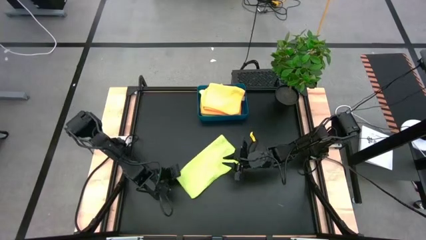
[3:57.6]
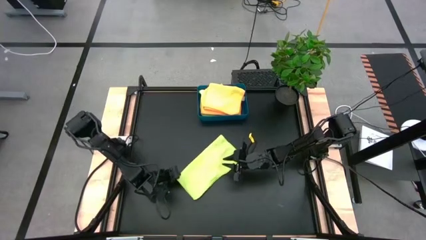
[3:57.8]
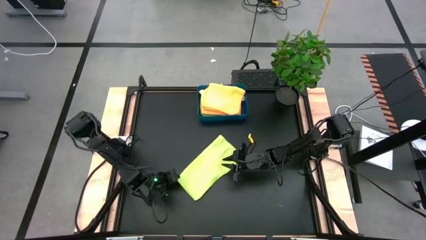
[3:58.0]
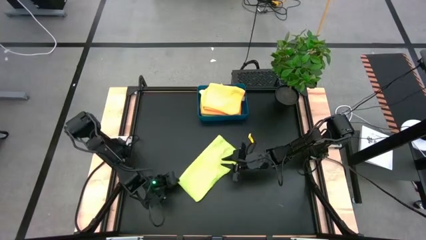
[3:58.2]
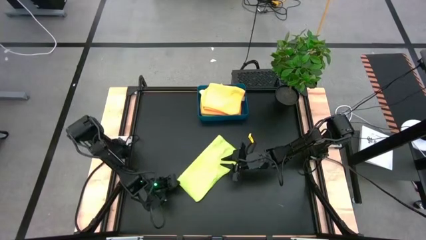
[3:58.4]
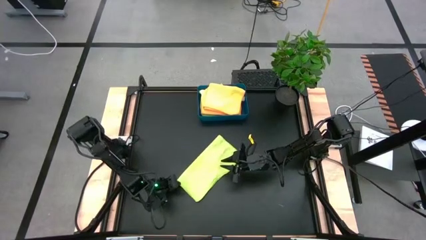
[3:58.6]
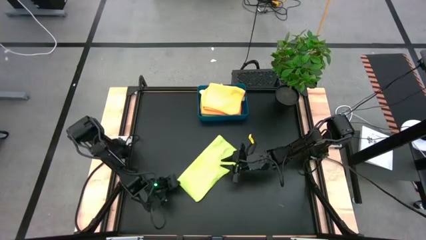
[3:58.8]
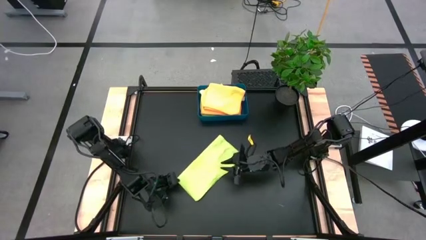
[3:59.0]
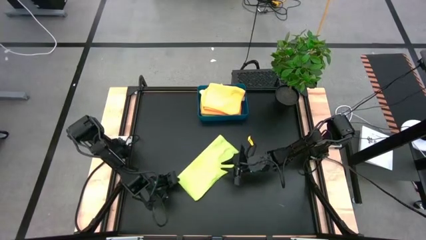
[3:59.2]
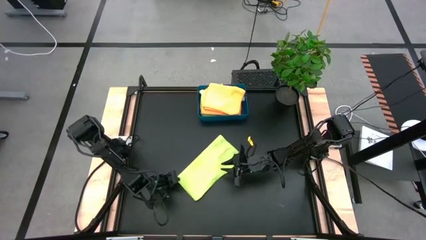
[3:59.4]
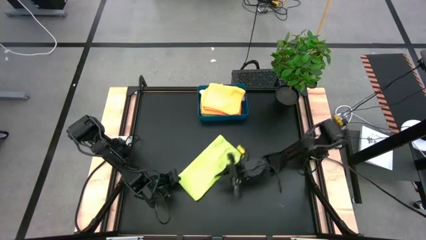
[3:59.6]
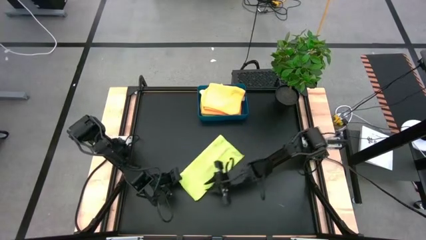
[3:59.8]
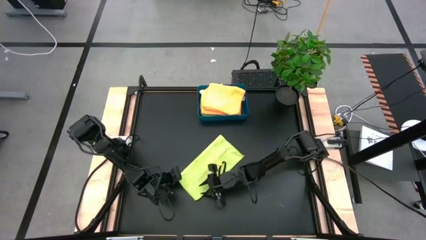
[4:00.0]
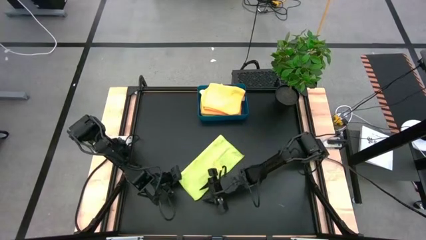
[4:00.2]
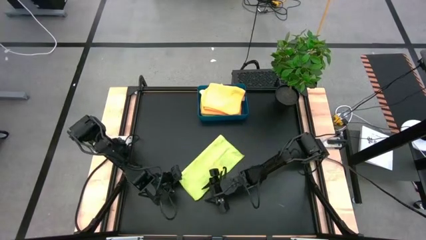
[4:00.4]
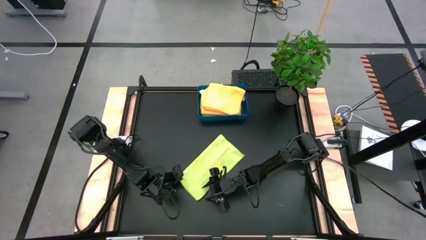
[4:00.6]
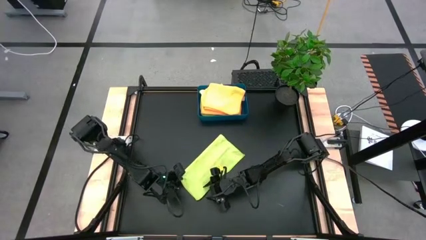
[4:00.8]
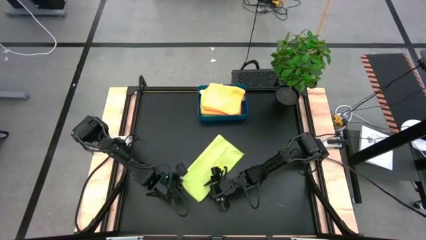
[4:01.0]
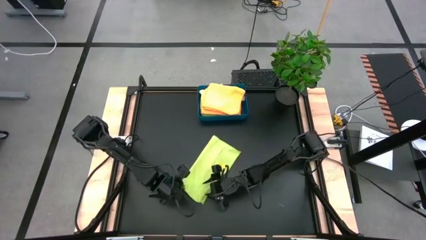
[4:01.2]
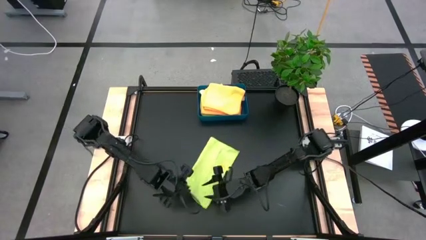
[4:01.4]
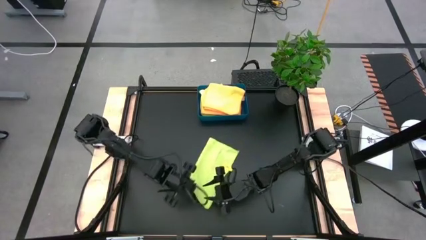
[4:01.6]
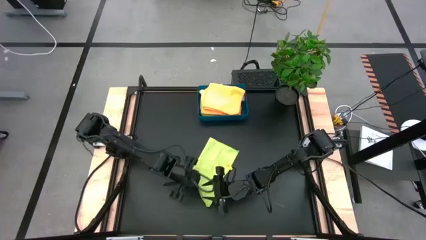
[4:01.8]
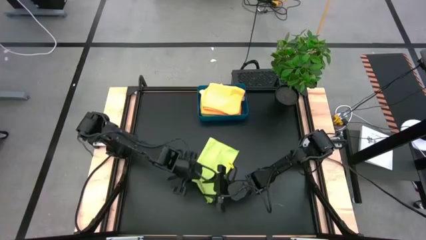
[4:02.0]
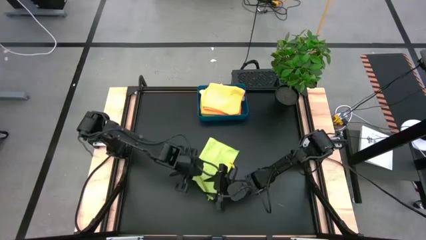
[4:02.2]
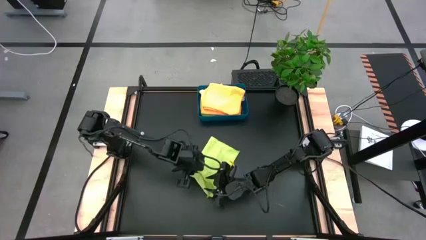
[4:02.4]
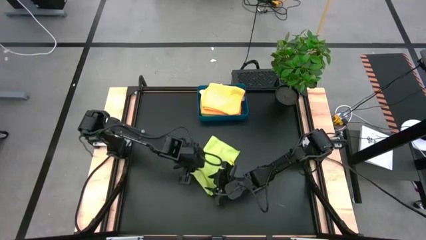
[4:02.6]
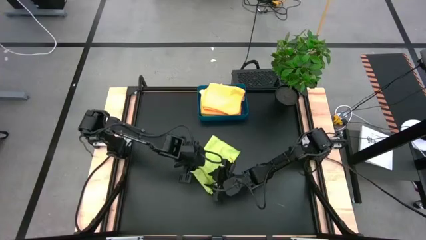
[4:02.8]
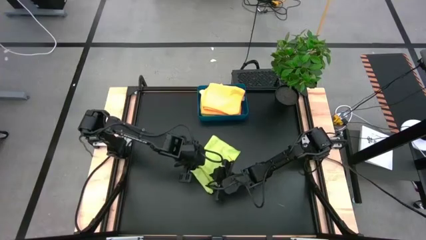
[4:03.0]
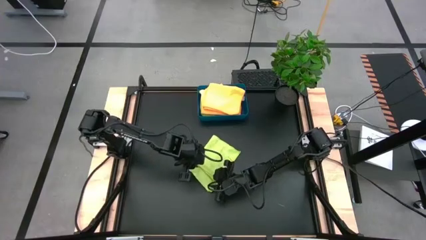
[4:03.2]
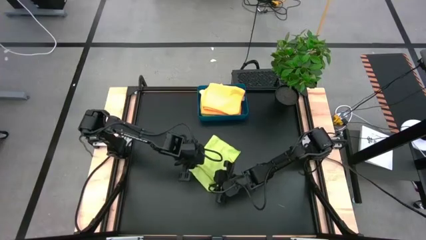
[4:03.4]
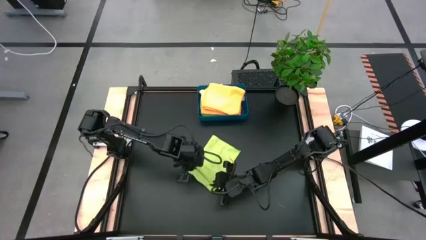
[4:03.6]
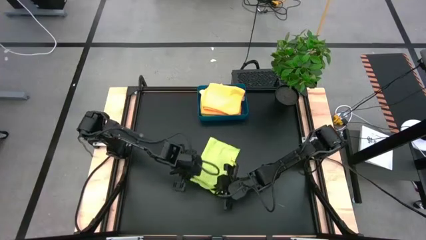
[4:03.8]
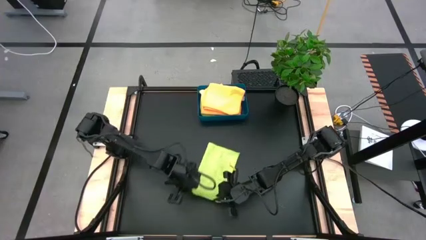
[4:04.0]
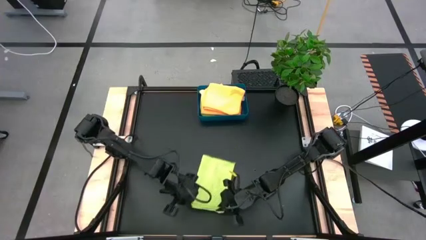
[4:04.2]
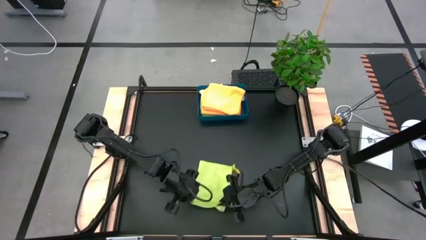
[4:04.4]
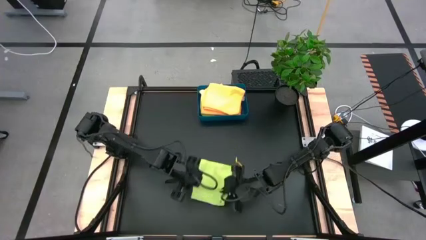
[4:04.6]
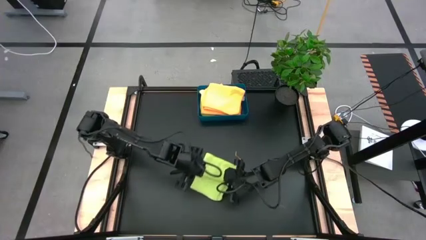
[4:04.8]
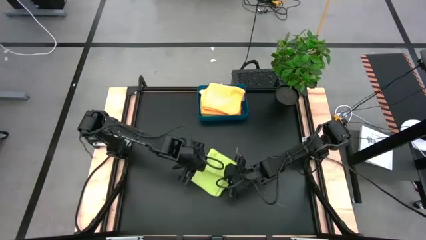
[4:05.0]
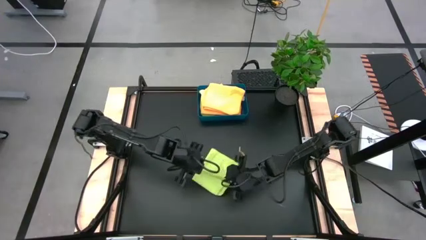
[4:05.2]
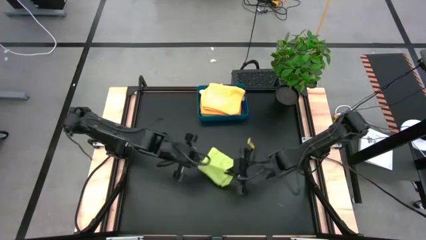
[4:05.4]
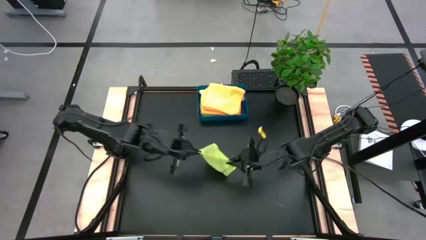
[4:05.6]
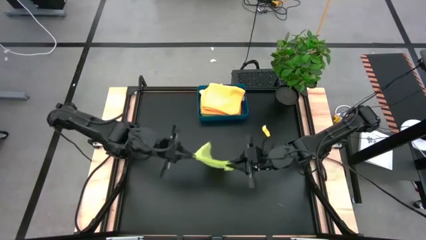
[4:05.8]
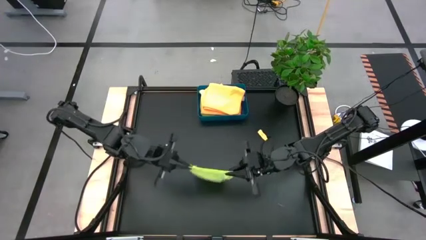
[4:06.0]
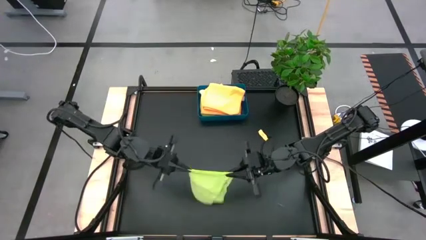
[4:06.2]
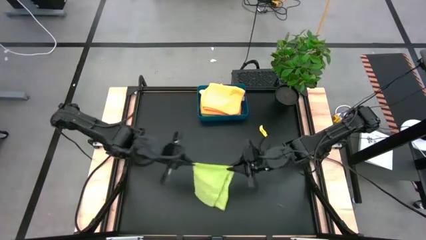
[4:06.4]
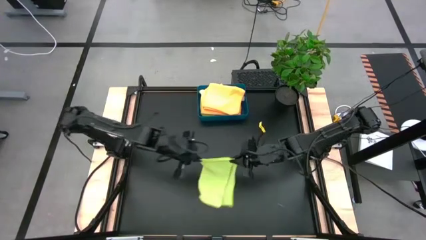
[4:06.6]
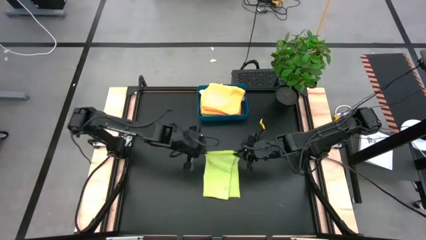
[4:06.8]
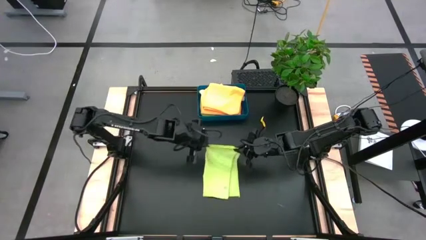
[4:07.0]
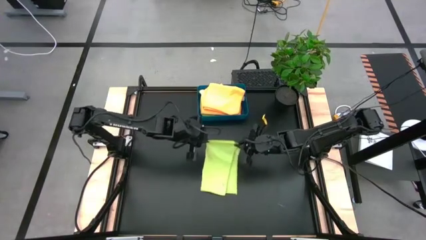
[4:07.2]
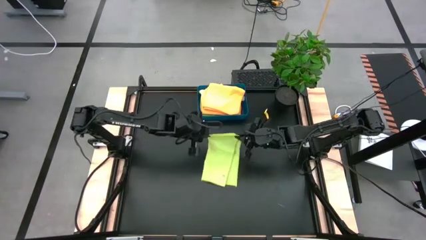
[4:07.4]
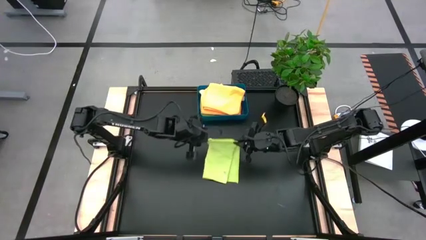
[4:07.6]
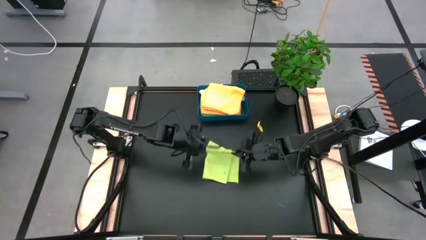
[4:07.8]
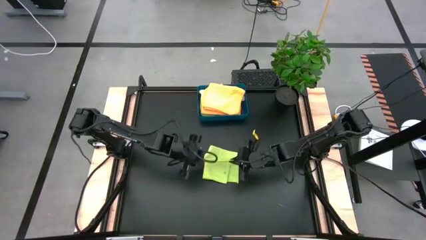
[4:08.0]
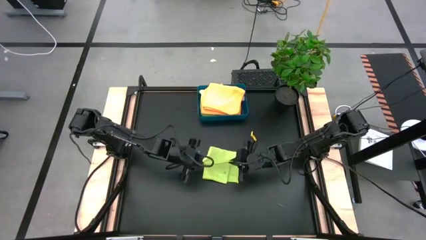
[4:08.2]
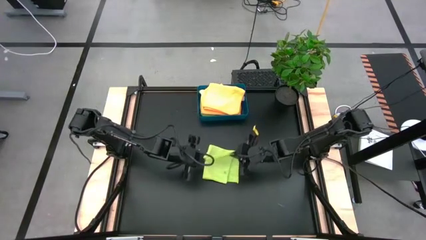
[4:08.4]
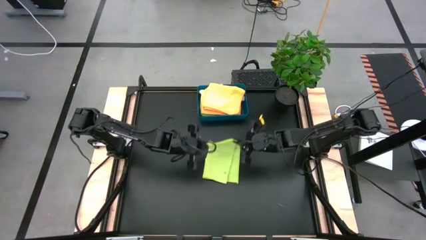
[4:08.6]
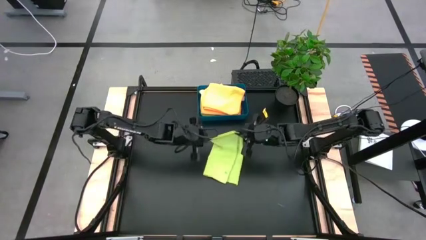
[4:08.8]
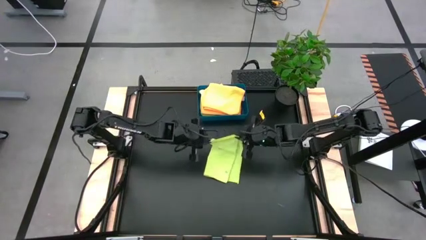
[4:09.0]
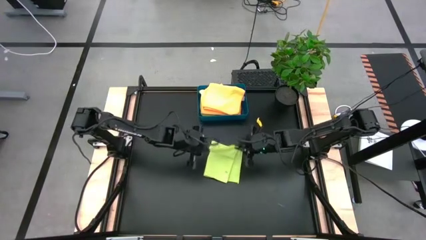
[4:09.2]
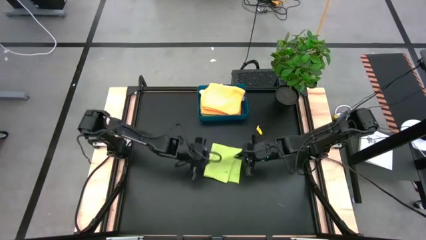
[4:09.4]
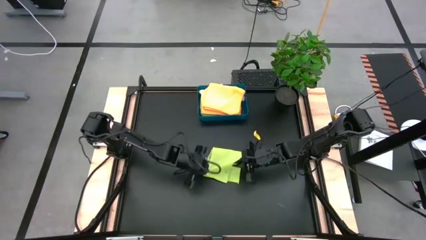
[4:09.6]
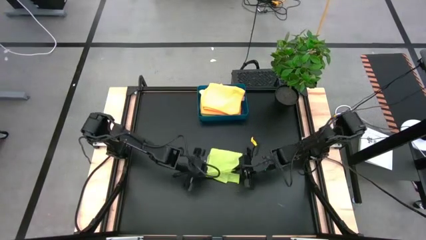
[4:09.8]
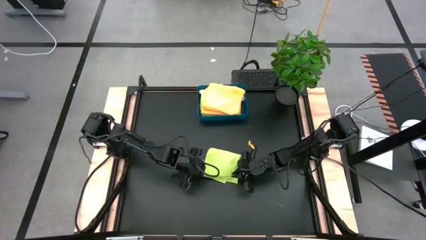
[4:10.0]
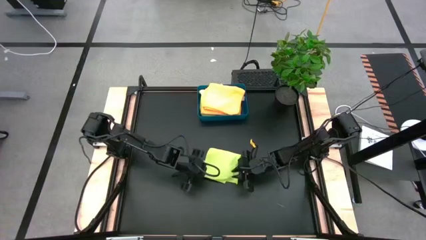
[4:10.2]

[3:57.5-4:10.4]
Task: Fold microfiber towels
Fold the green microfiber towel
